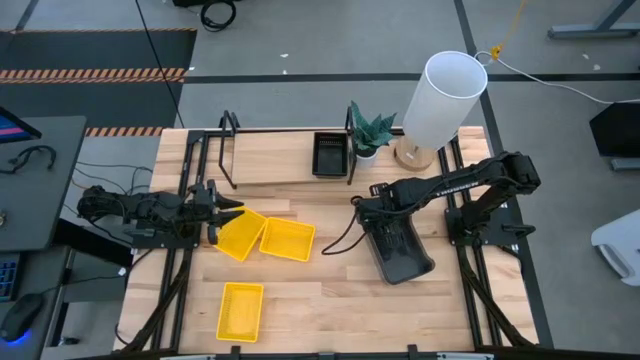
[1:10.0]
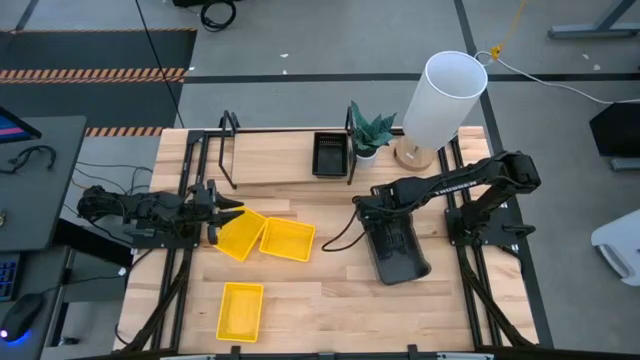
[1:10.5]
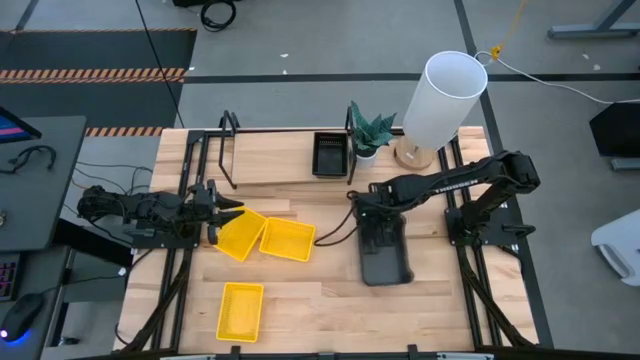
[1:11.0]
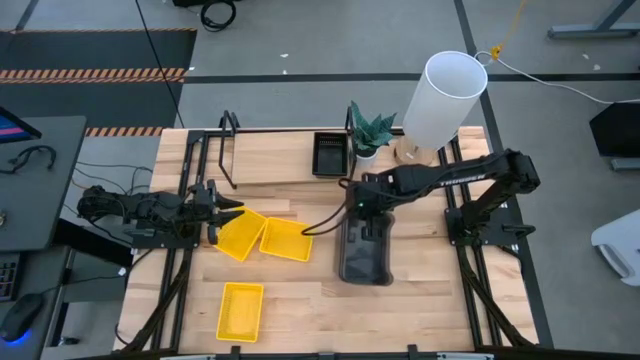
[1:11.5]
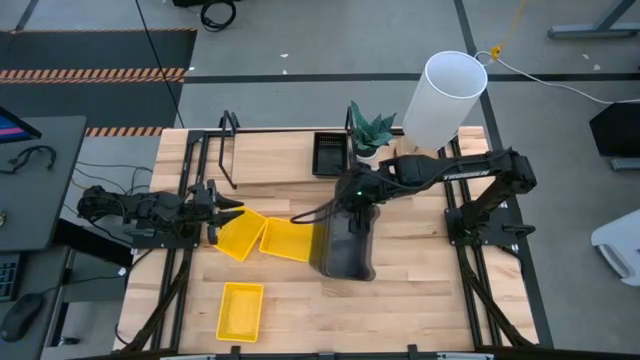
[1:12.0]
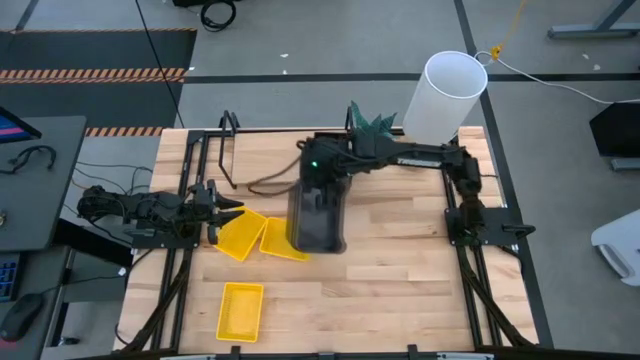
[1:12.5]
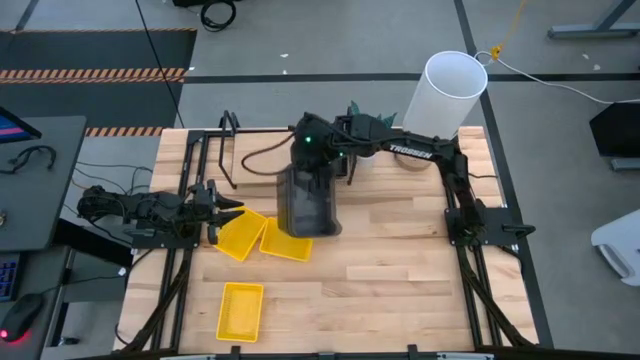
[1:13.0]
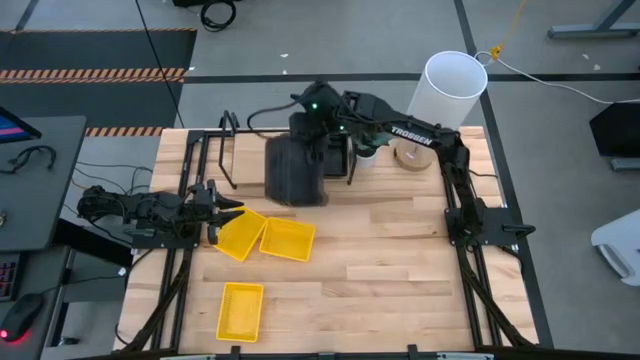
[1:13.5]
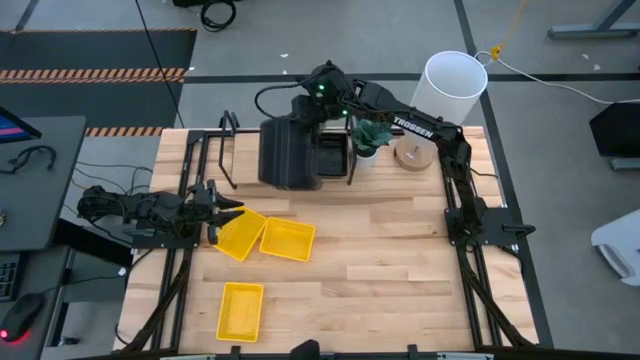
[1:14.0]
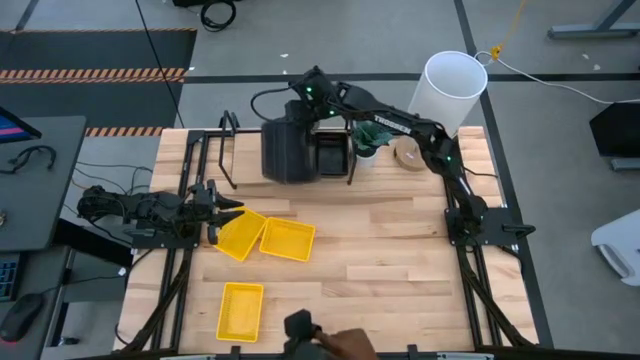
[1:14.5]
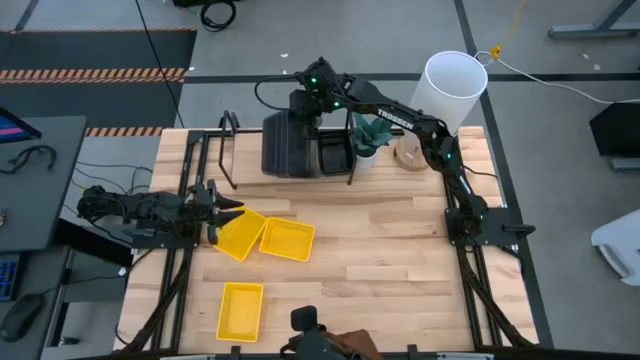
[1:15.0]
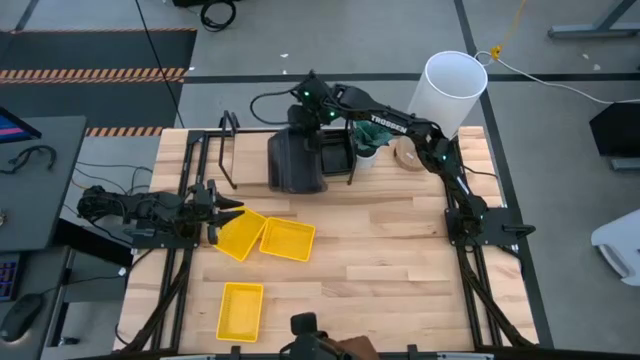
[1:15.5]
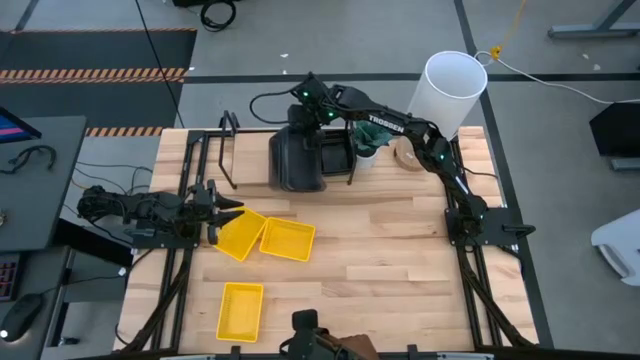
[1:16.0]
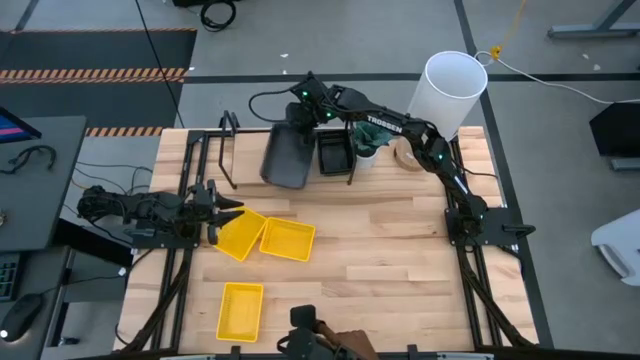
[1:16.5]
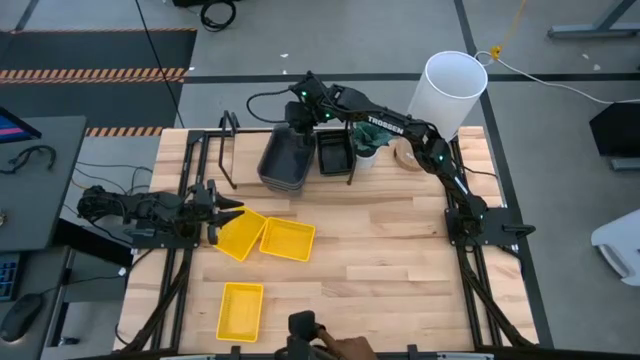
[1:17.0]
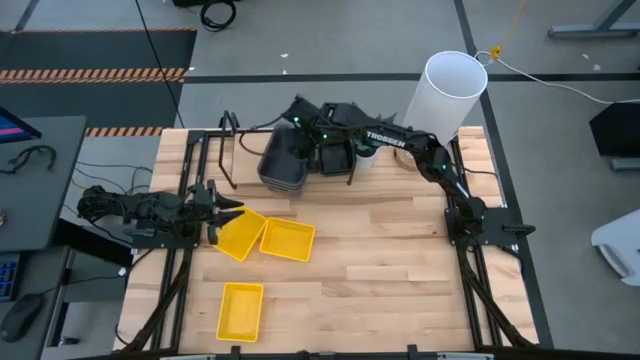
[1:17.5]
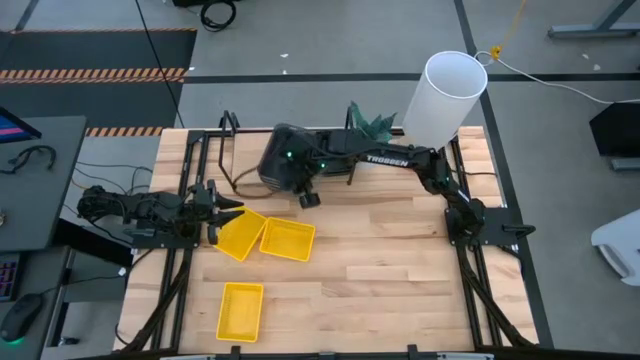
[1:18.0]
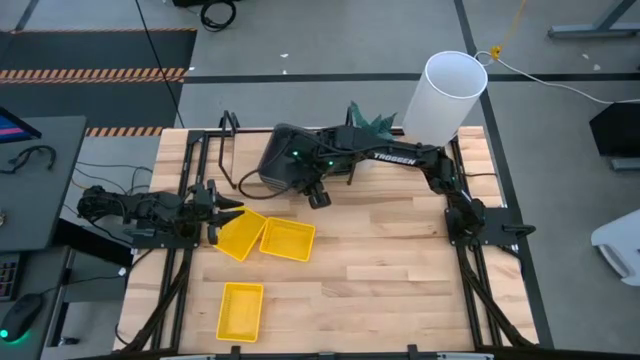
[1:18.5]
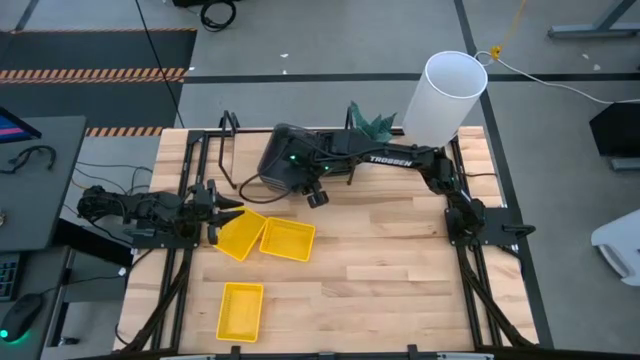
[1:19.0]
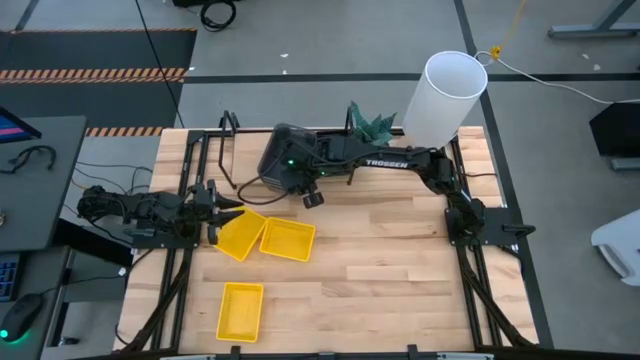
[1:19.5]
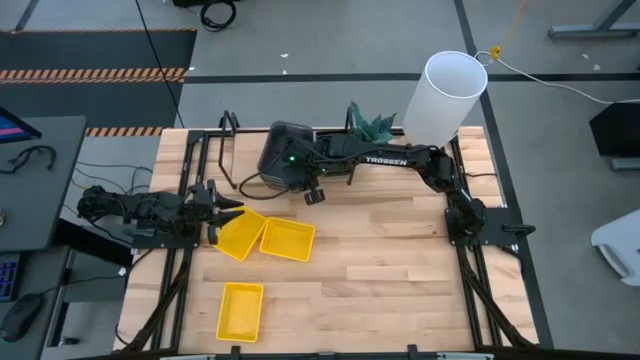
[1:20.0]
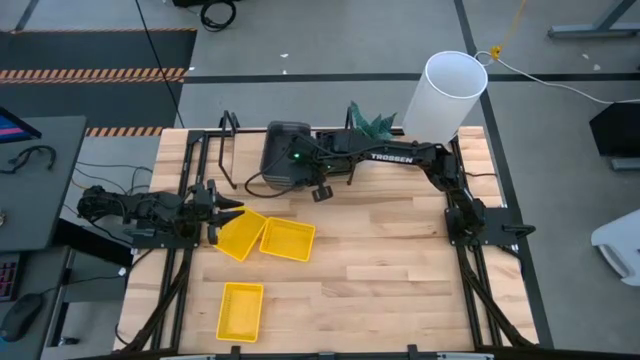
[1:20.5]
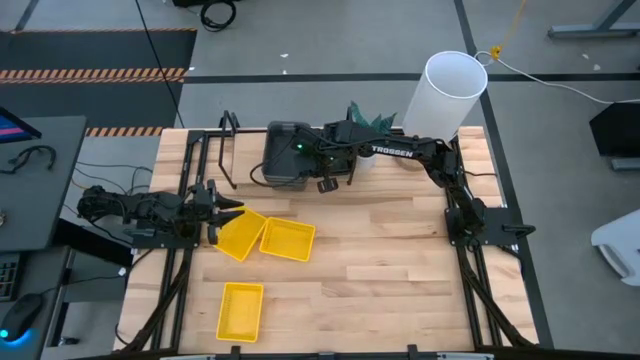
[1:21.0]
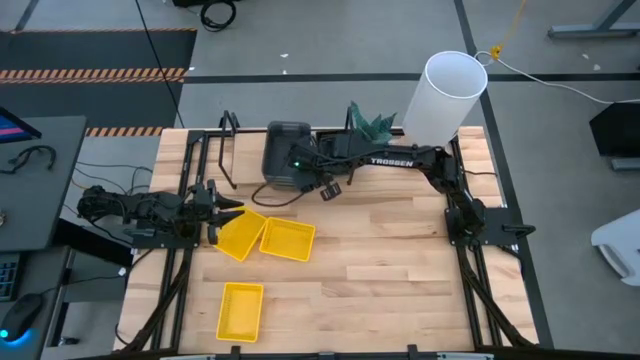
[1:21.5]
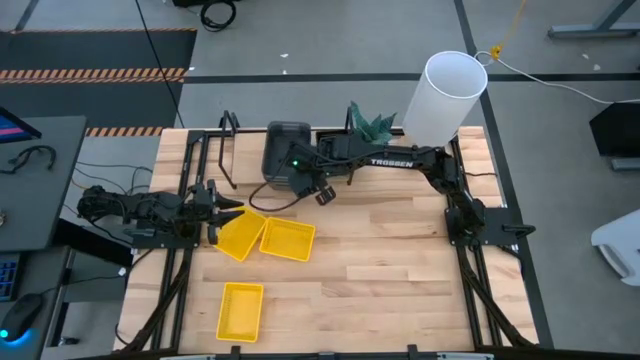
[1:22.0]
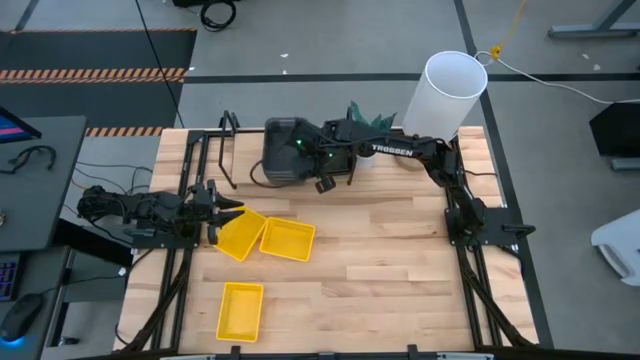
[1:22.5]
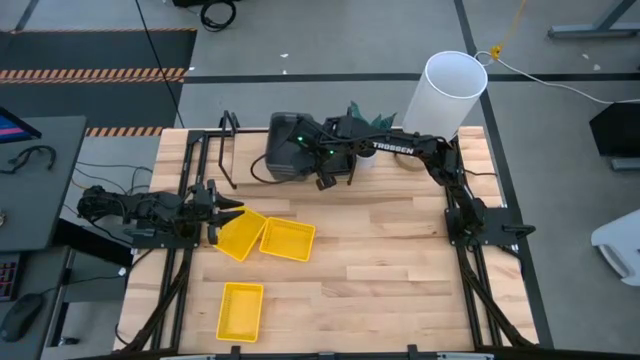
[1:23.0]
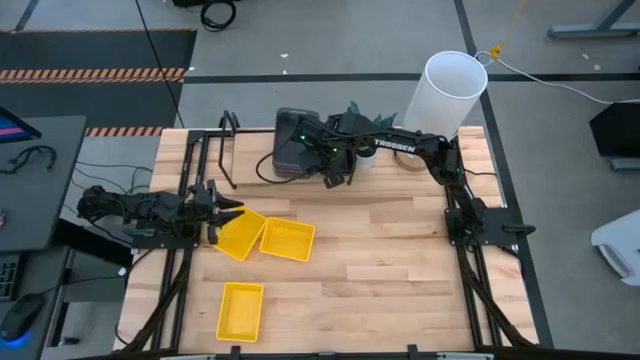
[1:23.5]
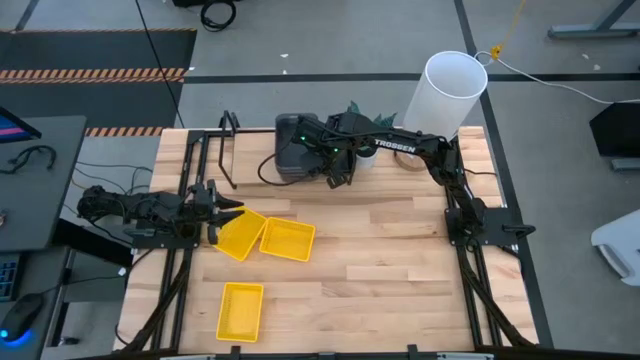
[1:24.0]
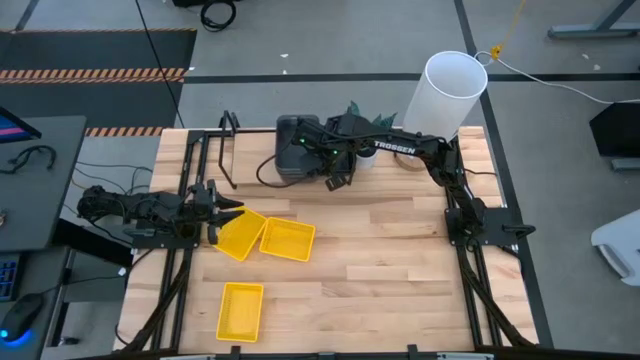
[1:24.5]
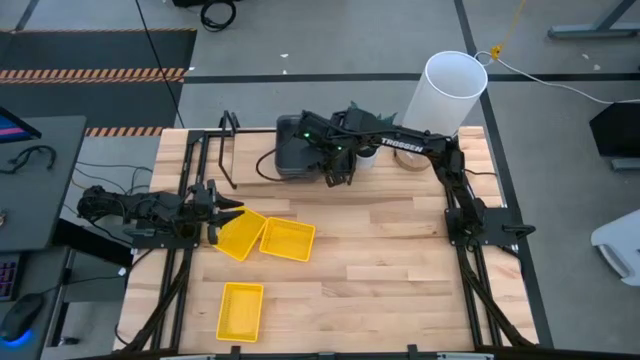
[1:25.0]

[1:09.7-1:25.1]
Task: Stack baskets on shelf by color
Put the stacked transparent black bins on the shelf

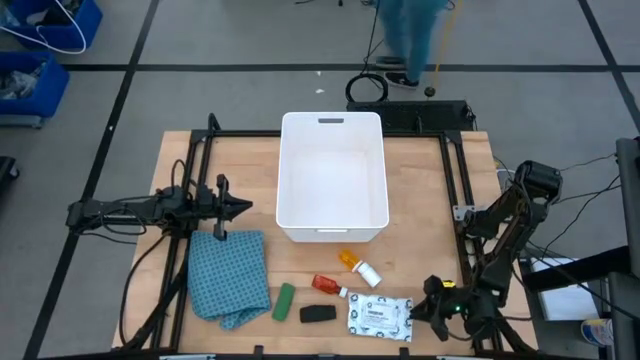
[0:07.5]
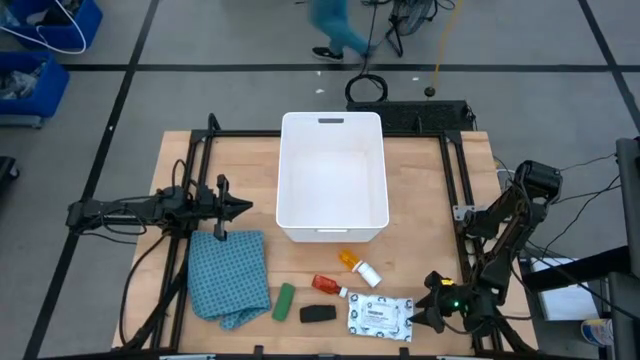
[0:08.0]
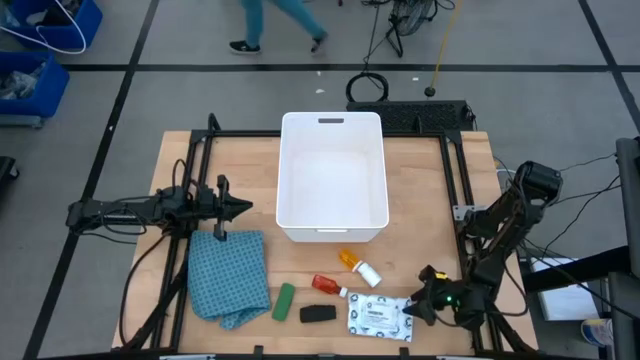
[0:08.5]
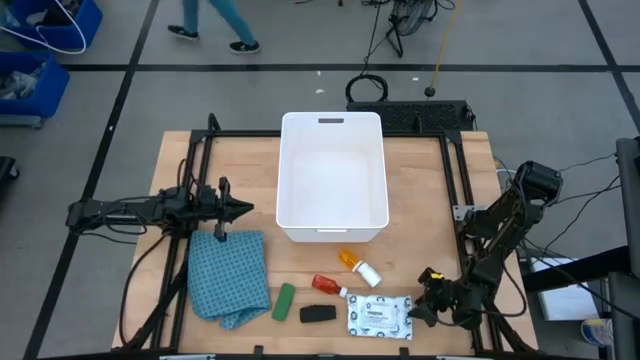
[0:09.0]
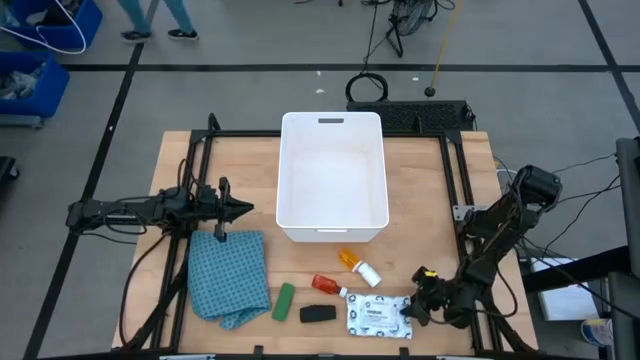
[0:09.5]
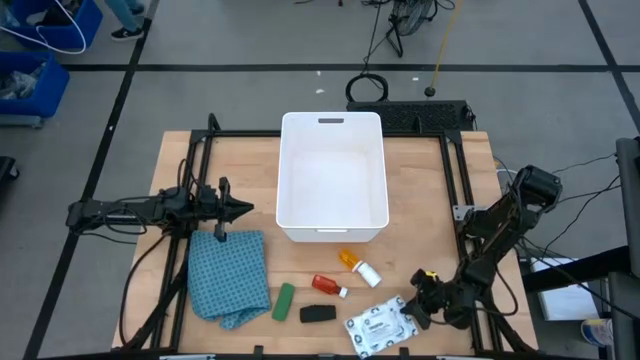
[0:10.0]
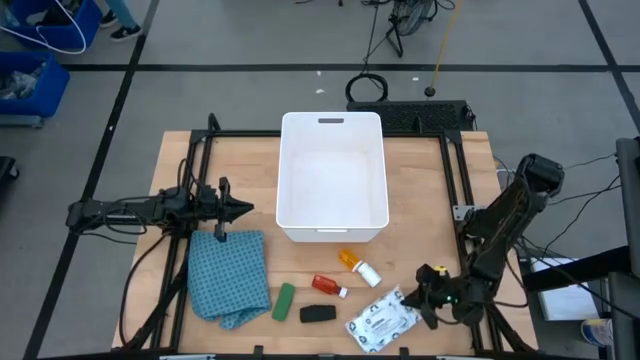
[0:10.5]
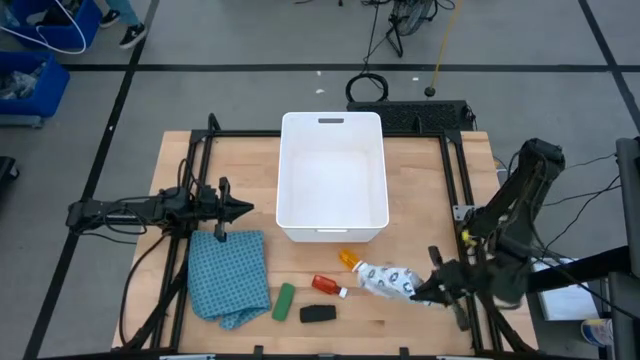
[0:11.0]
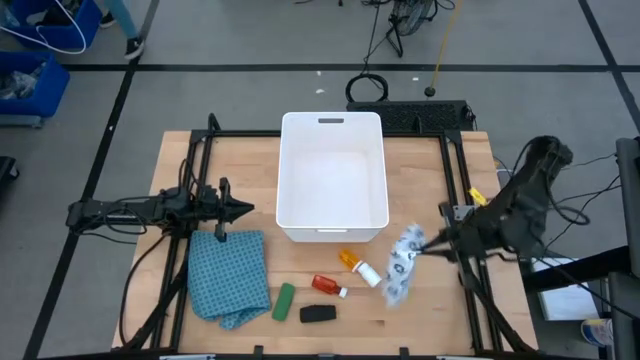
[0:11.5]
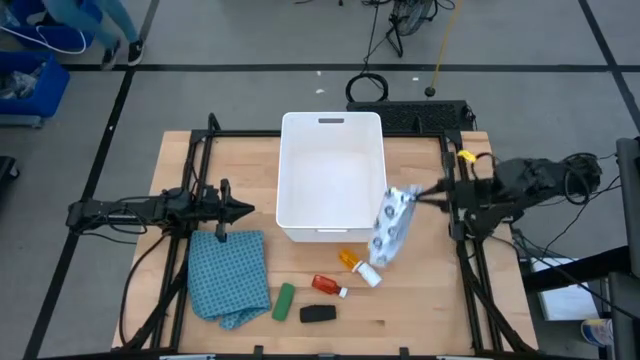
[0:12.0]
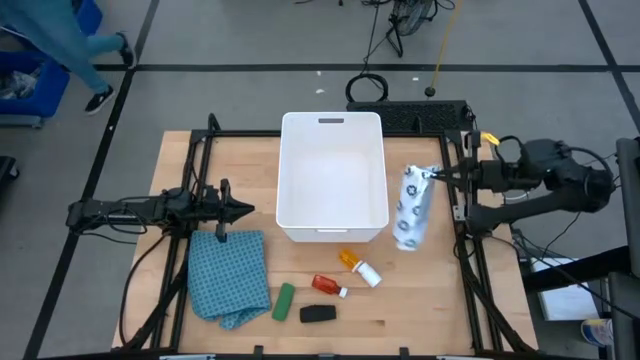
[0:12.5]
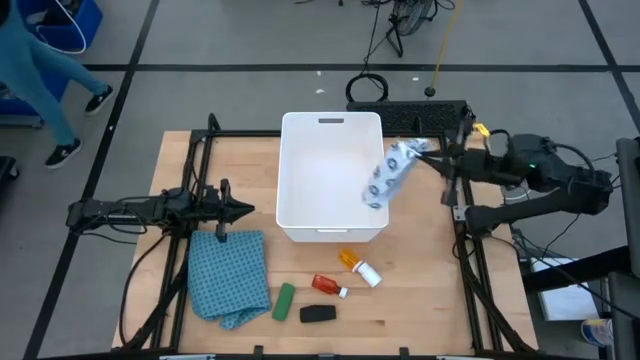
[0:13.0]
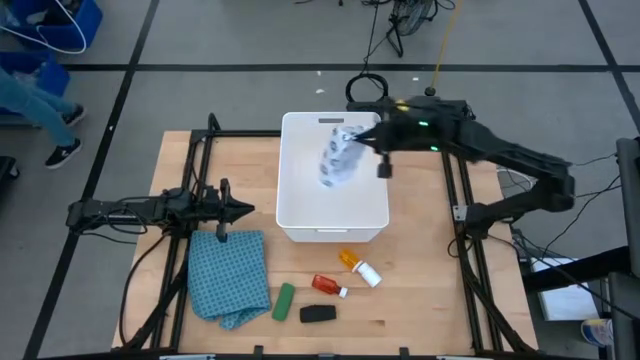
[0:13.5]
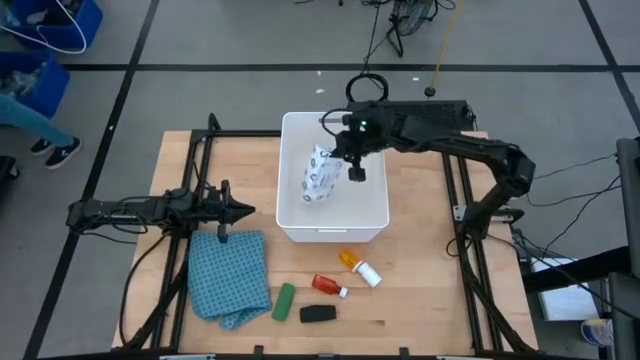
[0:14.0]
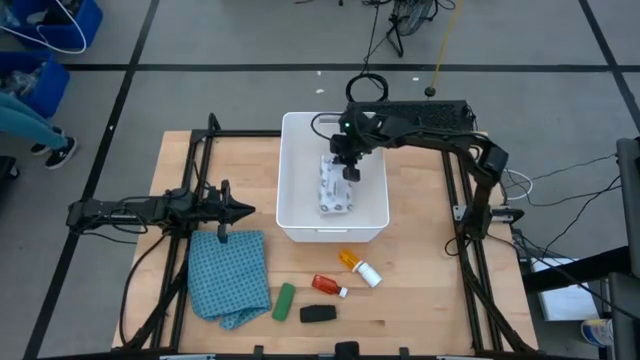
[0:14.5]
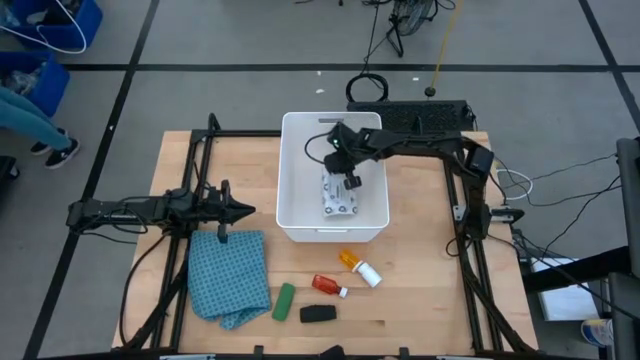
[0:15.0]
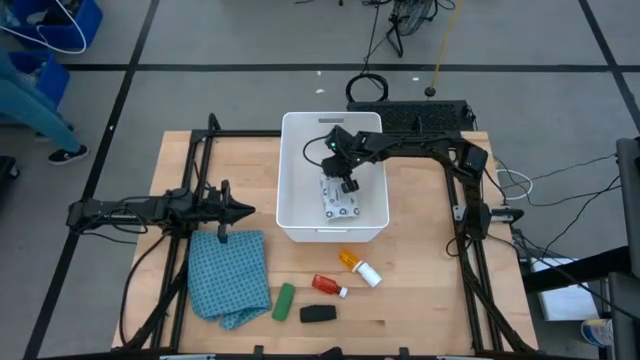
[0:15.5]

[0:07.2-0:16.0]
Task: Pick & place medical supplies in basket/bin
Put the mailer bag into the white bin
